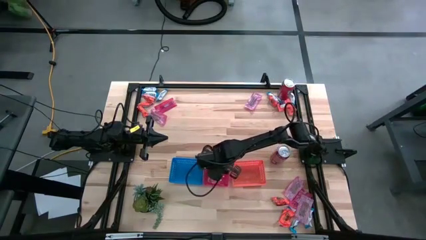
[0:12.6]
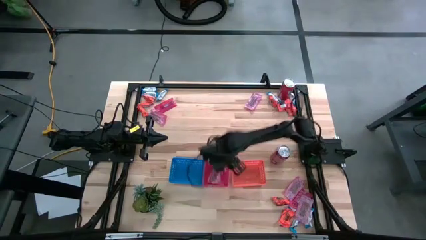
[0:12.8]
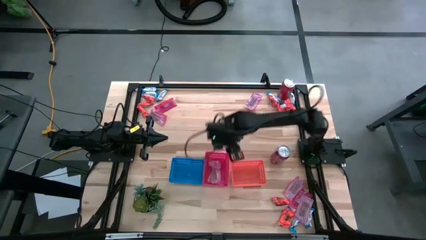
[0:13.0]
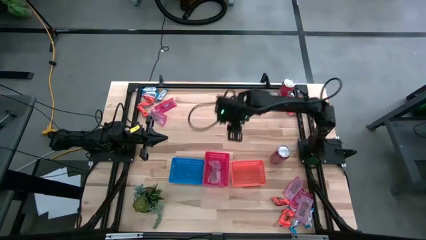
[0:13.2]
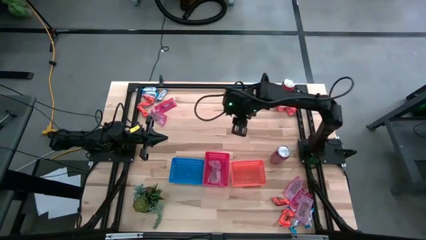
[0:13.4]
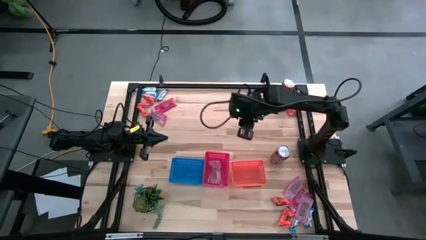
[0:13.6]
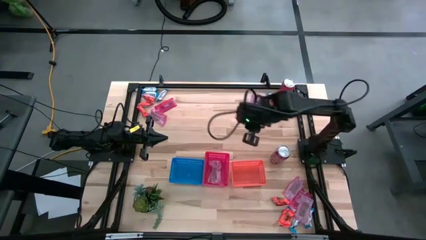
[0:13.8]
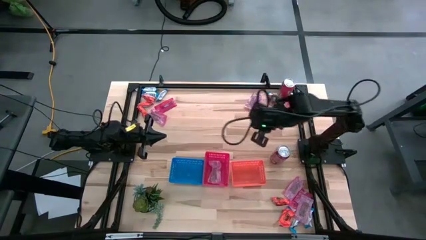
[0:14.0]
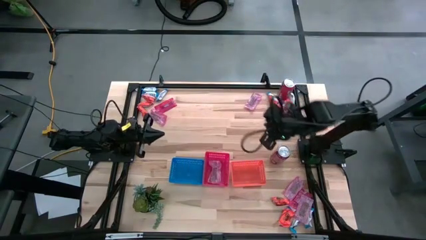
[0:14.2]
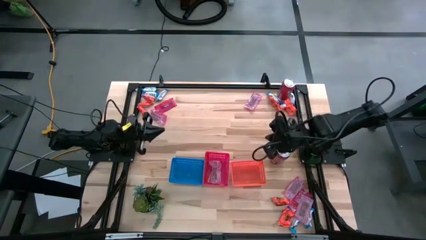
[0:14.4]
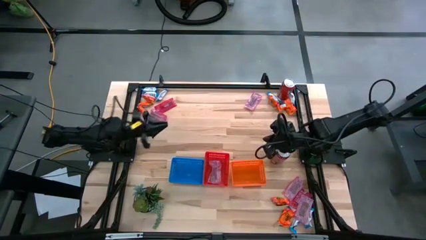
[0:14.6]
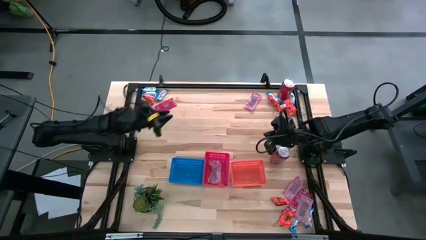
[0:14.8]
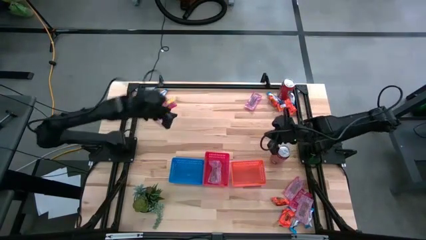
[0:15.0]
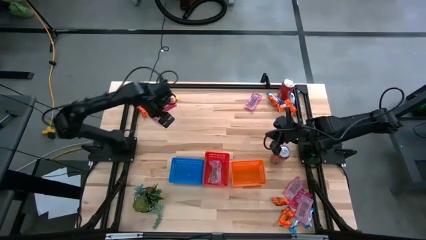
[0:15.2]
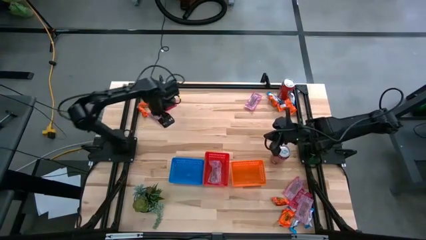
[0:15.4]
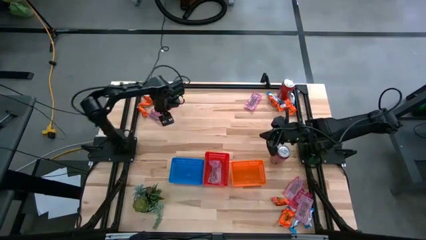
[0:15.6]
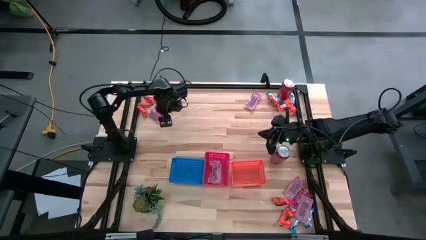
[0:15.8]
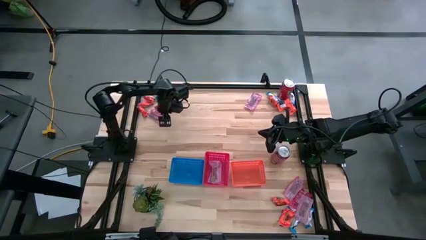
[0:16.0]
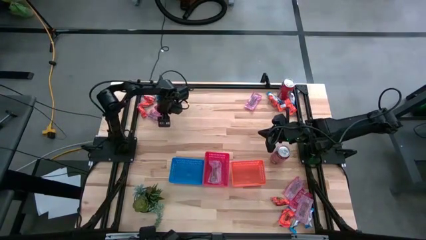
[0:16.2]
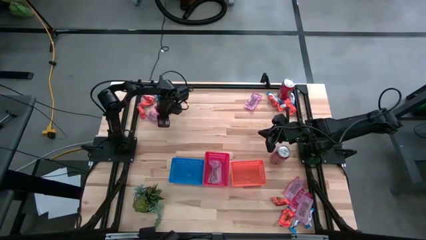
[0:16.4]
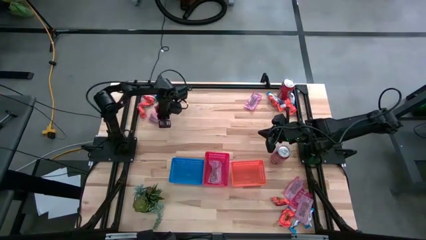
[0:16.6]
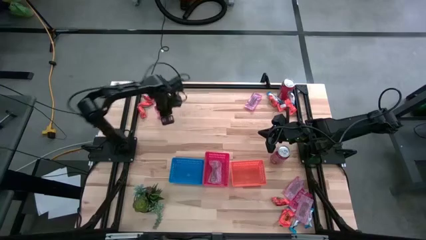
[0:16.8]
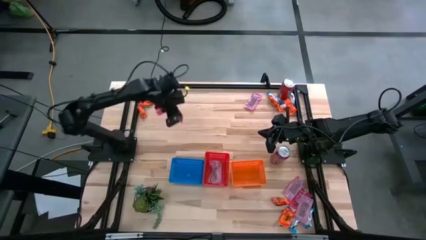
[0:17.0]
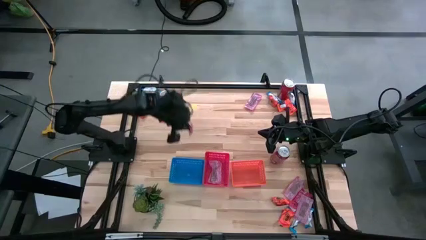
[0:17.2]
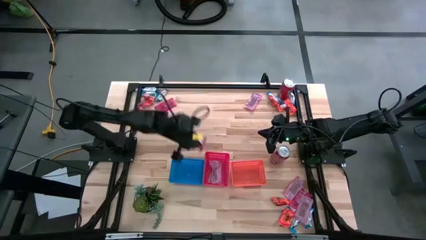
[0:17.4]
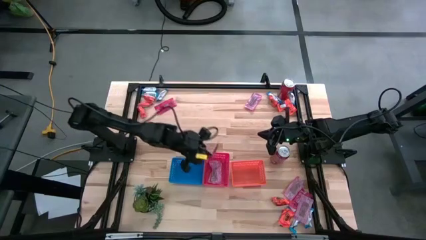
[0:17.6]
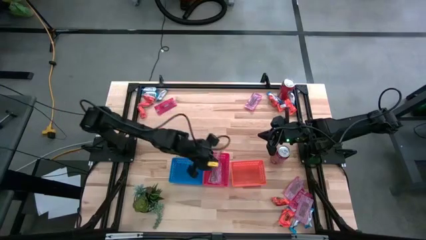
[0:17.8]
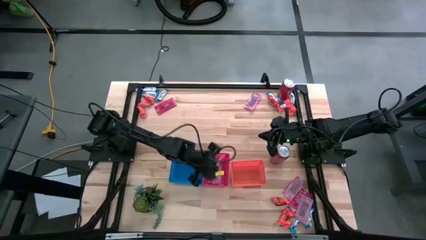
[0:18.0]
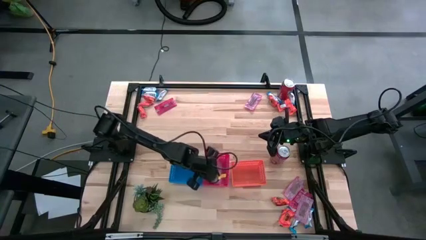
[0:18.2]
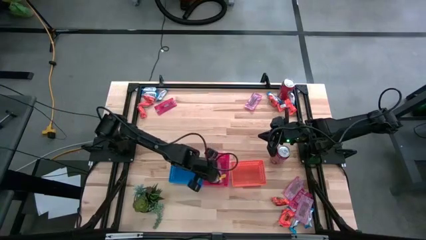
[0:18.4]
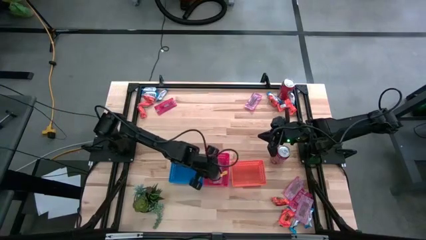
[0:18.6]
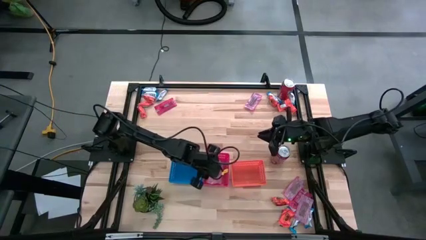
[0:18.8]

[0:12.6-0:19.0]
Task: Sort candy
Put the red candy pack into the red bin

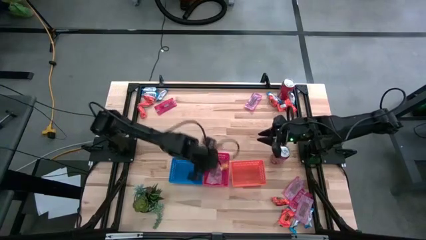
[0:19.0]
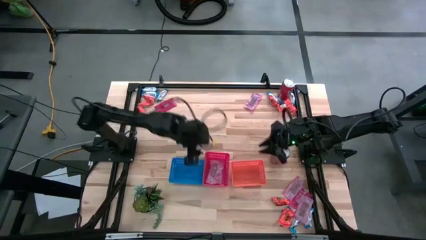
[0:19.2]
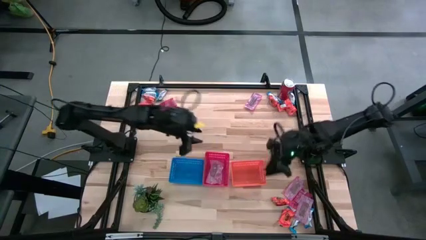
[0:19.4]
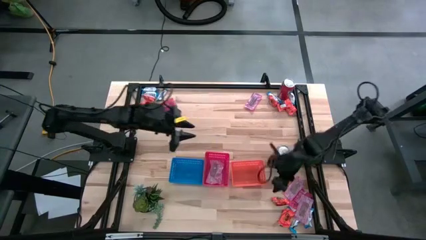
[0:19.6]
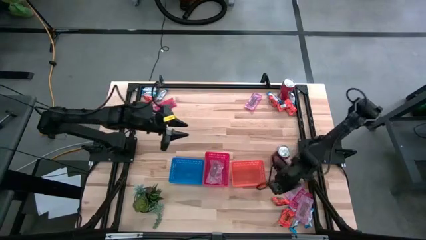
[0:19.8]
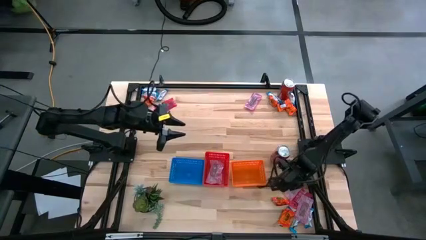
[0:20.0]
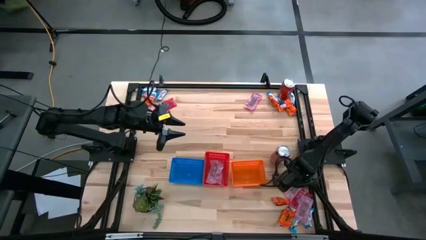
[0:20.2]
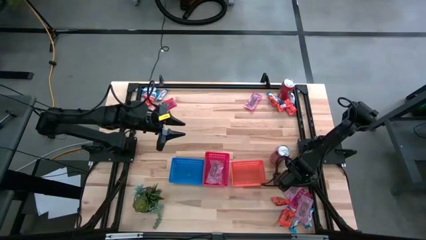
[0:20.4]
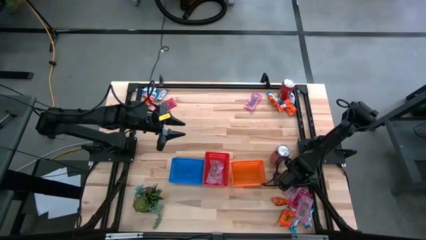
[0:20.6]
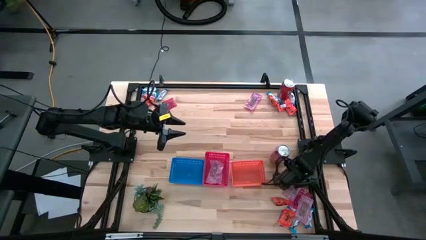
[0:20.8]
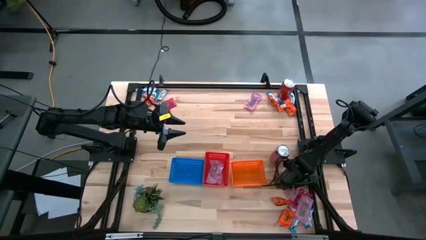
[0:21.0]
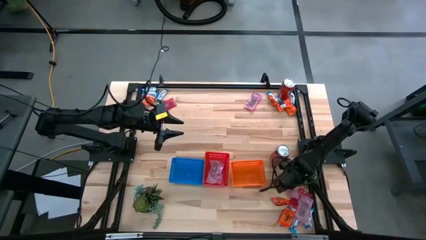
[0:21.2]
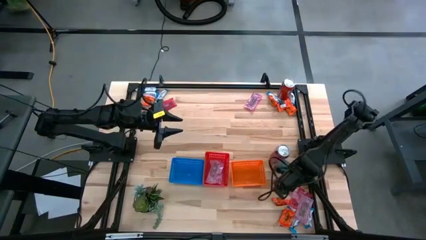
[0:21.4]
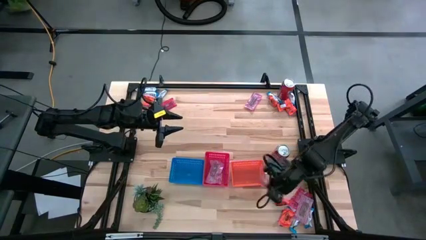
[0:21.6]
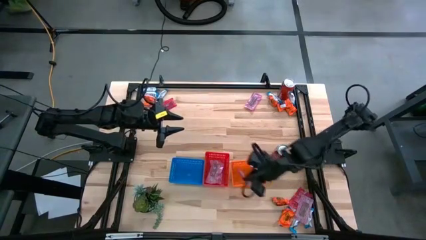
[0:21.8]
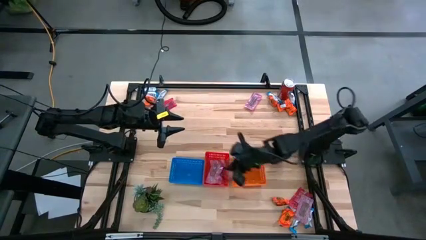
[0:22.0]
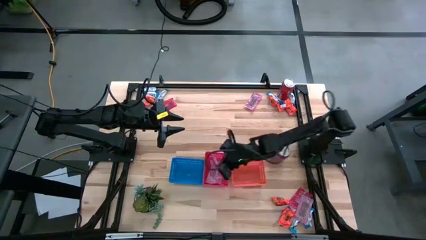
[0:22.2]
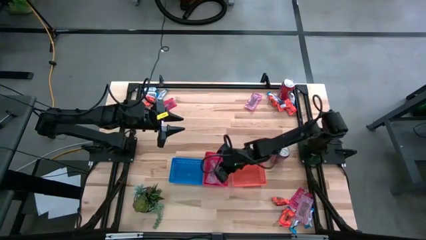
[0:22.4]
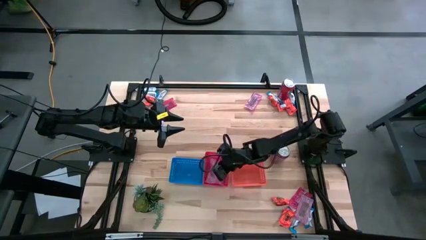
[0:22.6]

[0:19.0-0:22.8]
Put the red candy pack into the red bin

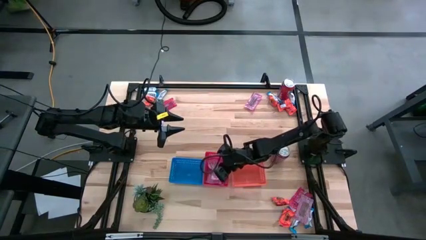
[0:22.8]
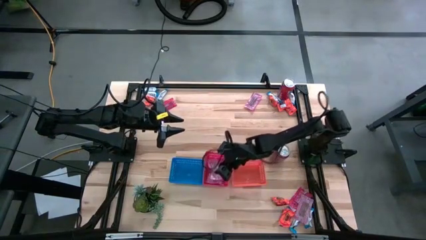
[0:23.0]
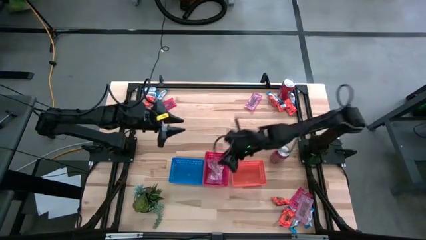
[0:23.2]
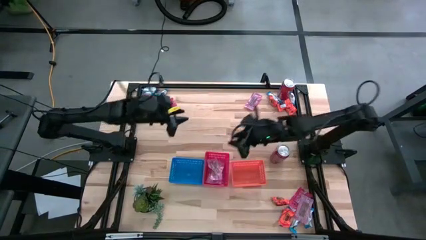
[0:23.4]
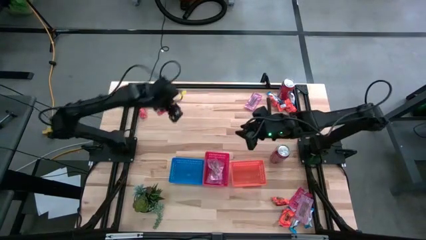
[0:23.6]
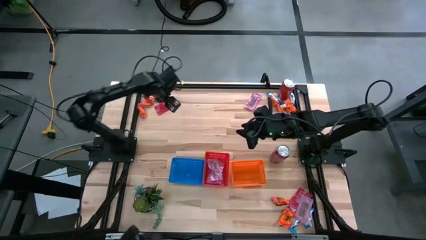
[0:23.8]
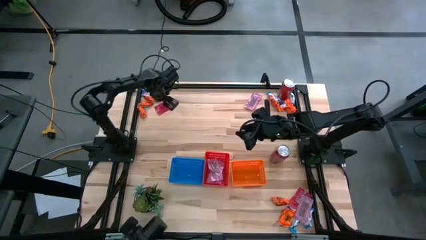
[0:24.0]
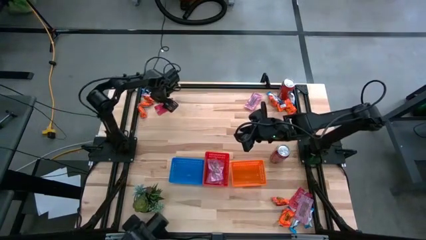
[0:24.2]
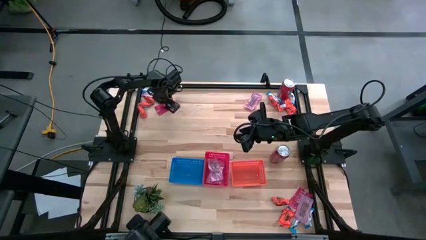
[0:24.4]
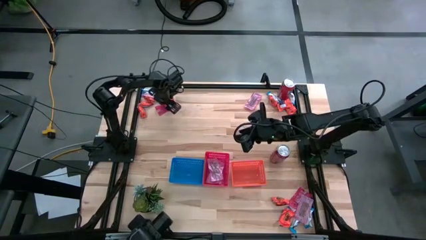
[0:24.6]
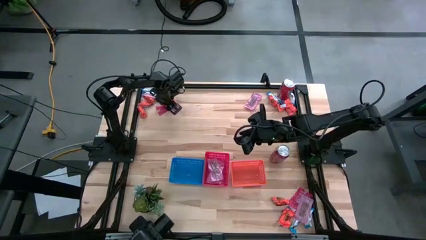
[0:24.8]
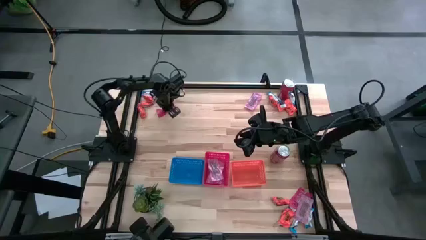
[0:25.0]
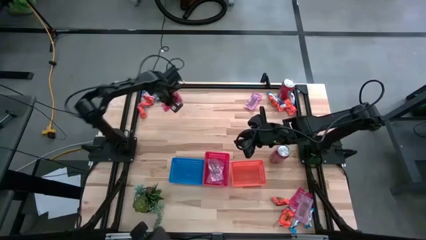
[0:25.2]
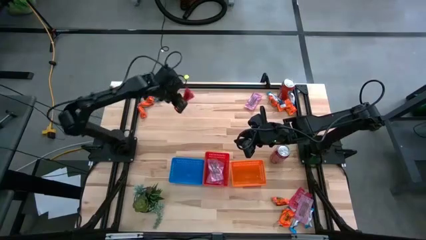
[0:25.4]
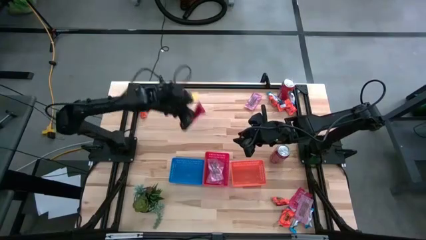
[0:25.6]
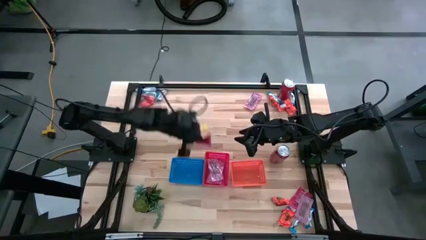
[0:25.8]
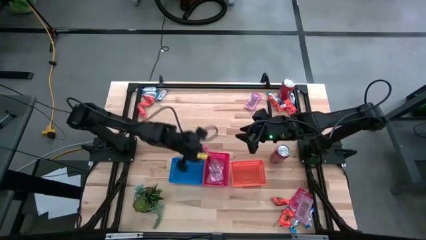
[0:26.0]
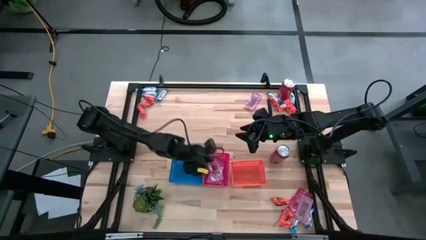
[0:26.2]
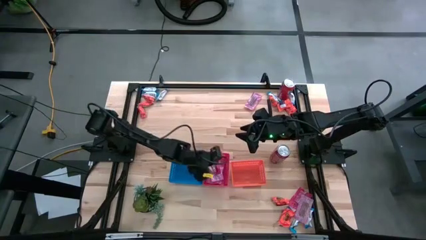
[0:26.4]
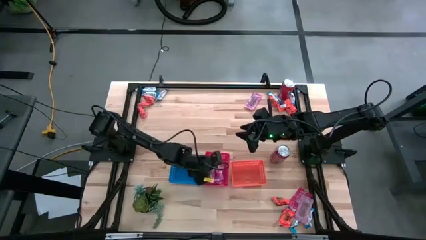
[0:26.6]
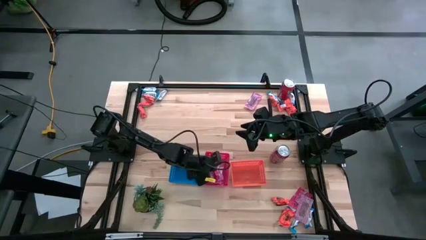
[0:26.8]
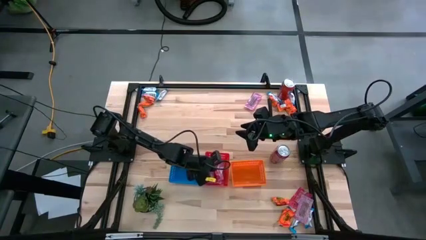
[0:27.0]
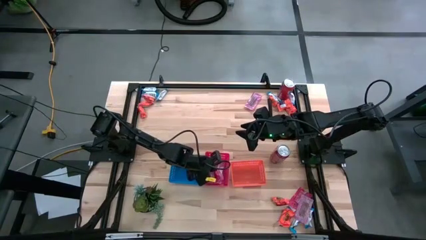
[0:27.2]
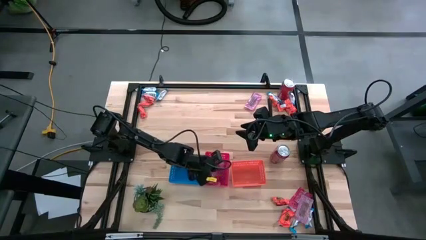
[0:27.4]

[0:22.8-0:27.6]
Put the red candy pack into the red bin
